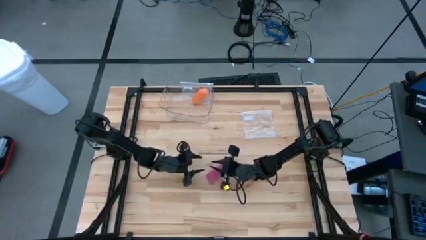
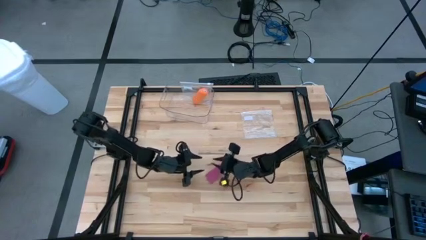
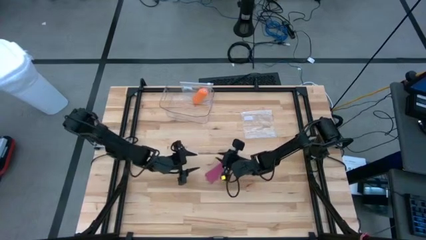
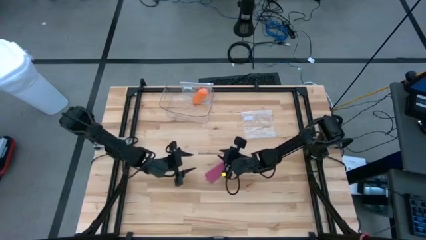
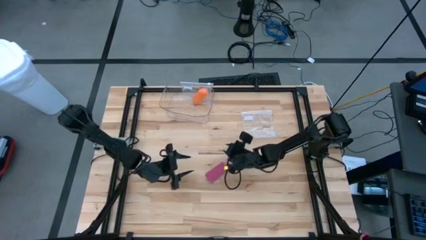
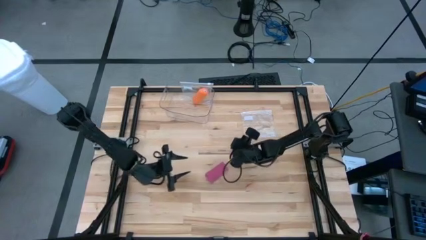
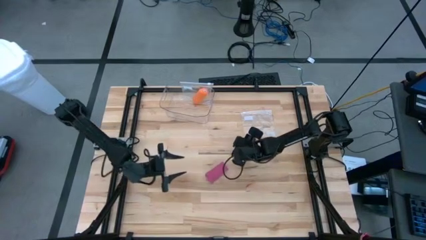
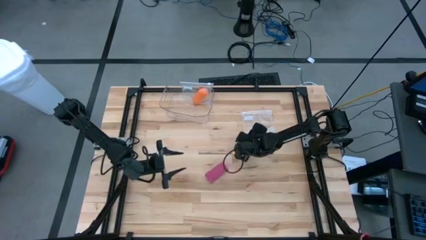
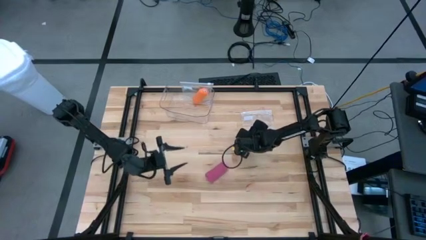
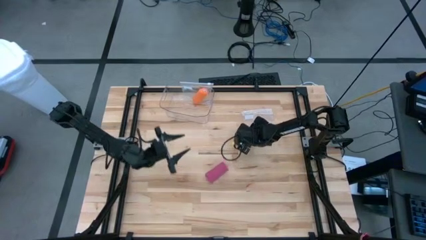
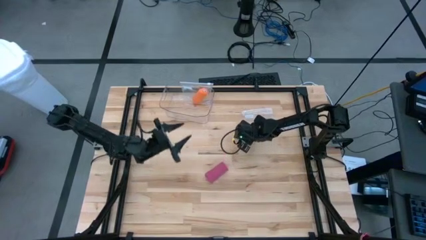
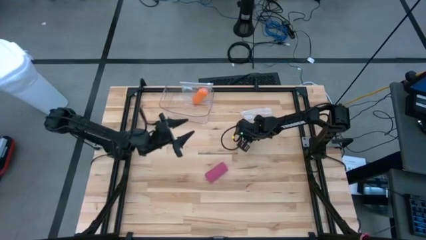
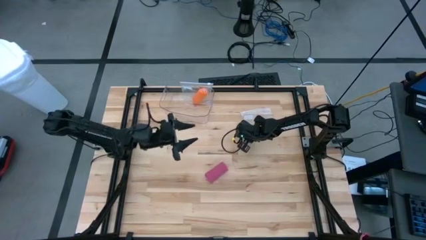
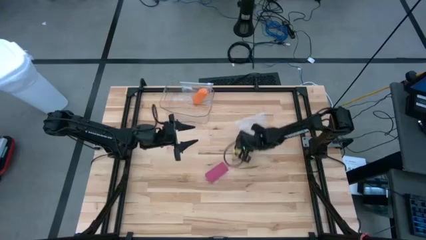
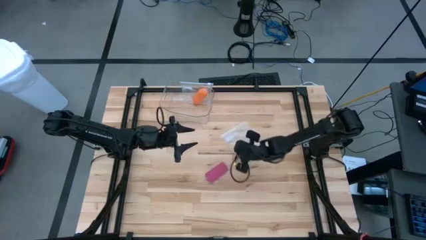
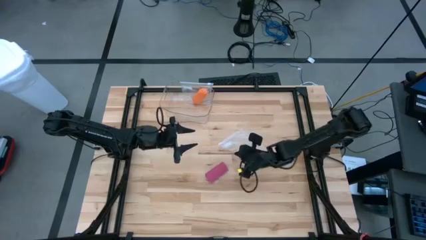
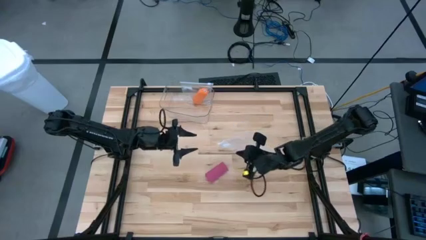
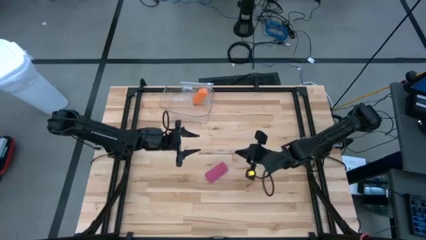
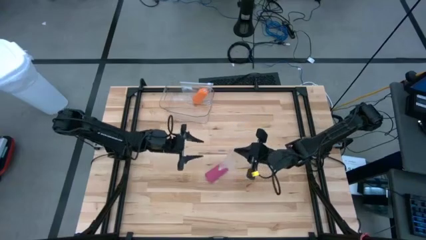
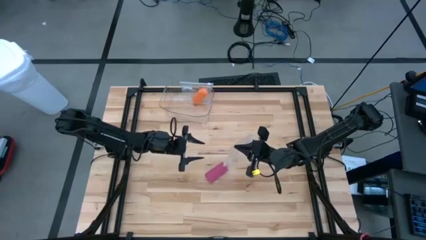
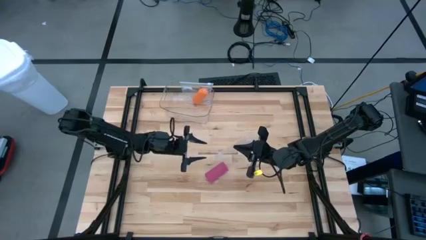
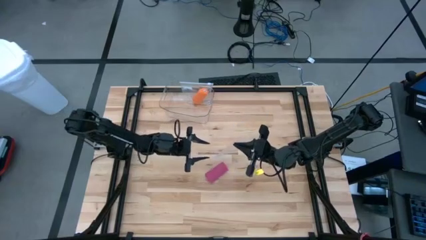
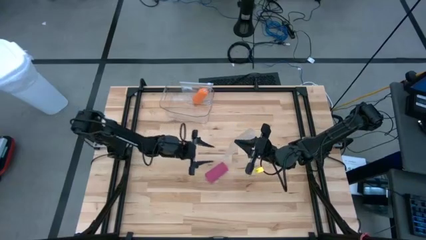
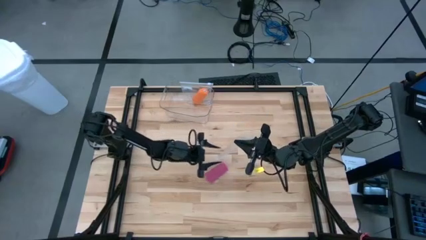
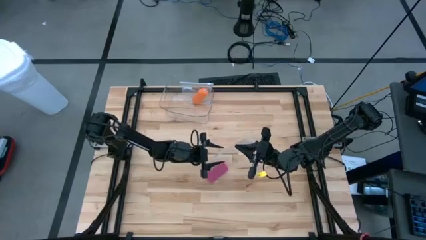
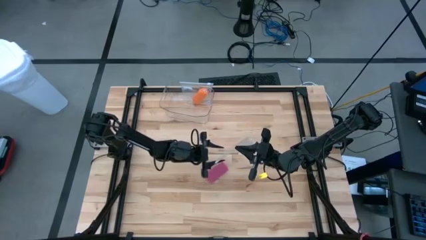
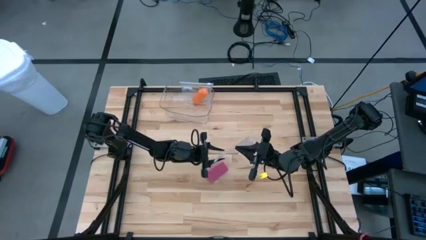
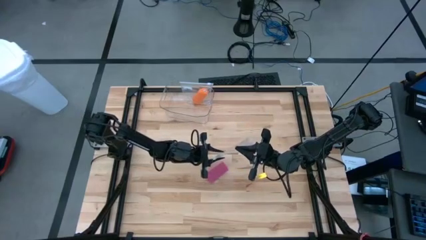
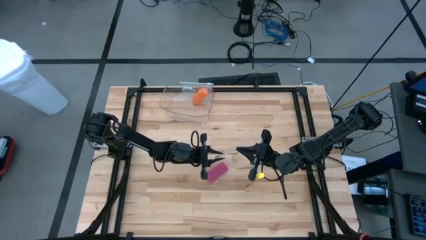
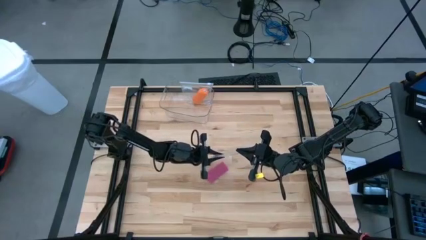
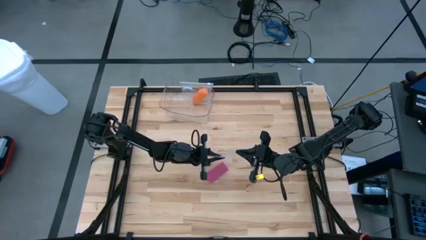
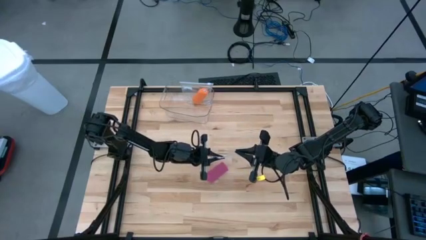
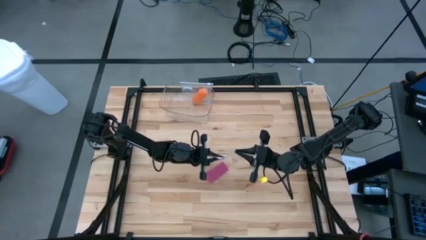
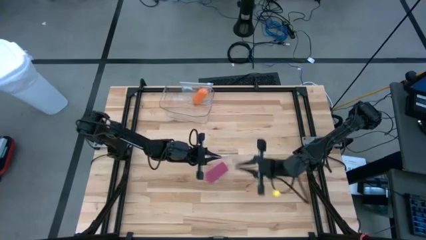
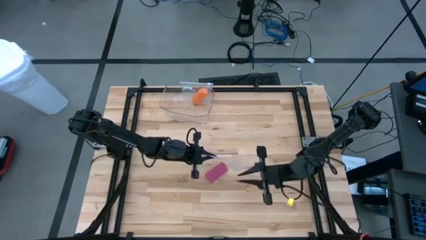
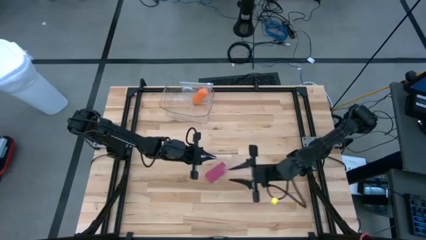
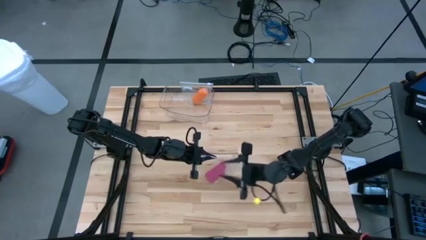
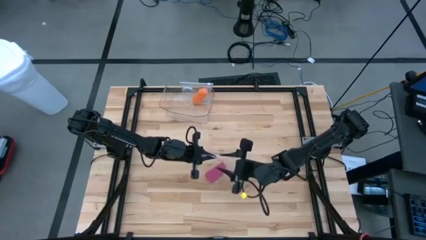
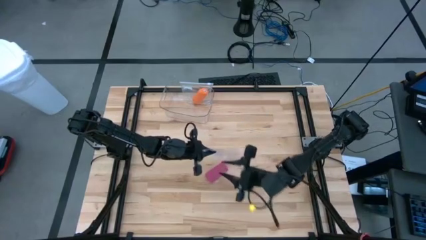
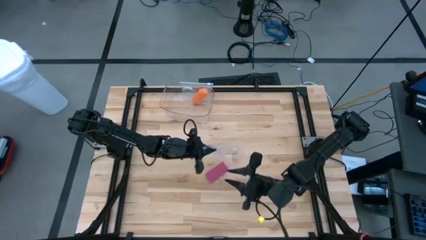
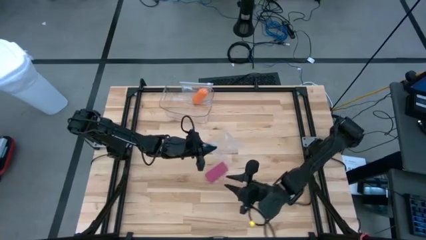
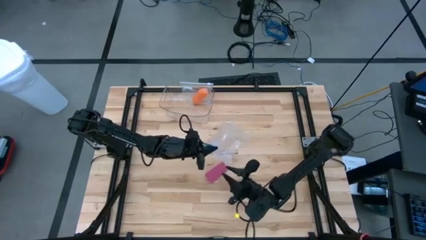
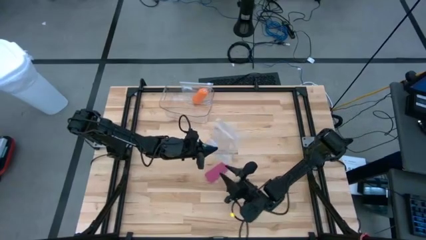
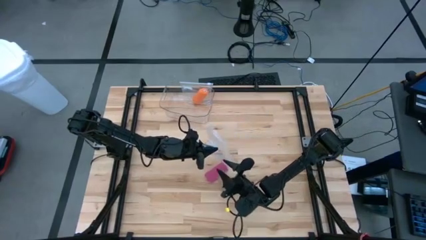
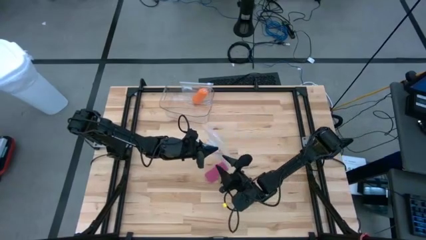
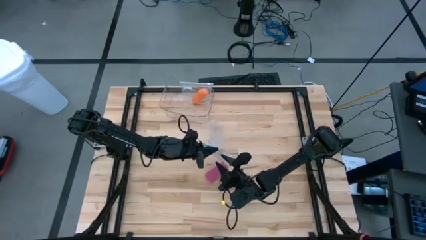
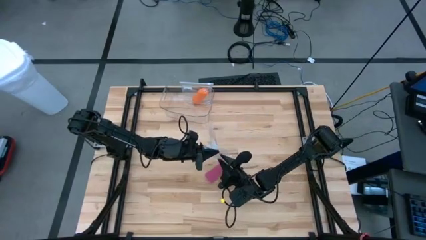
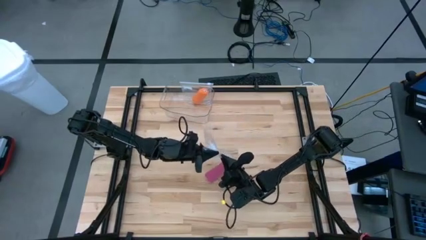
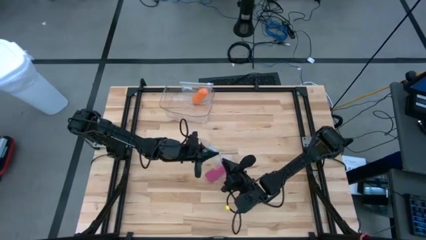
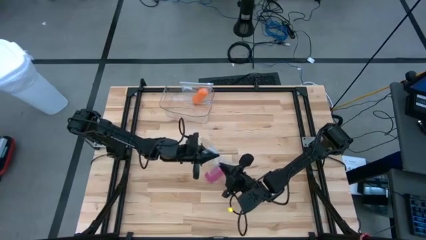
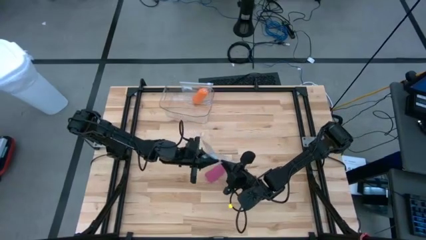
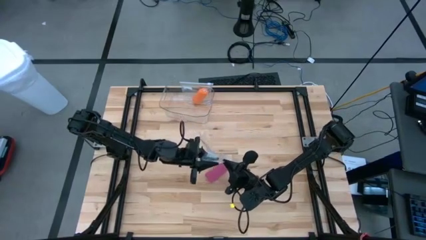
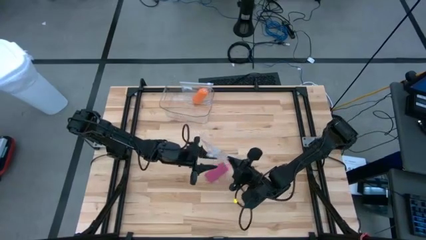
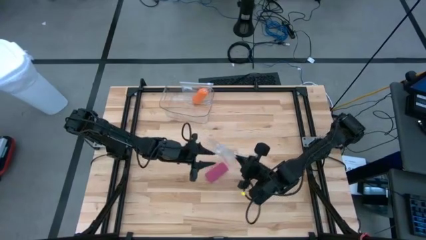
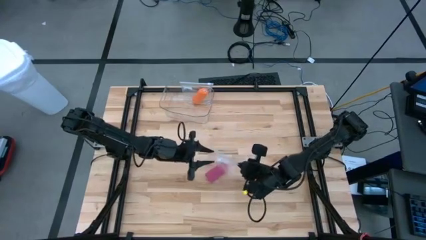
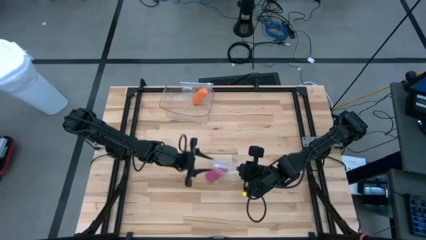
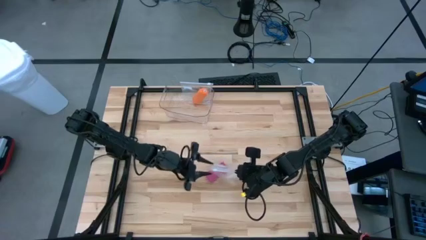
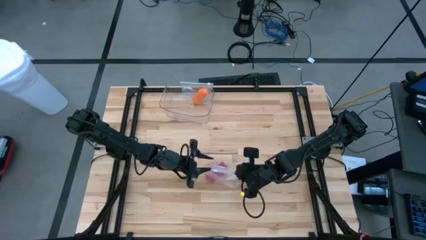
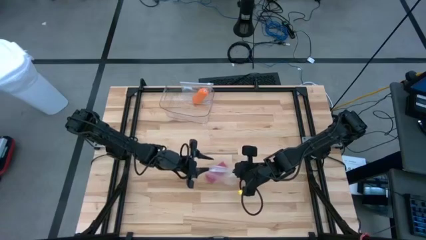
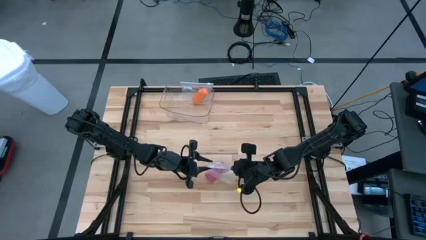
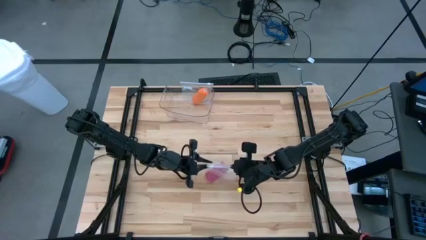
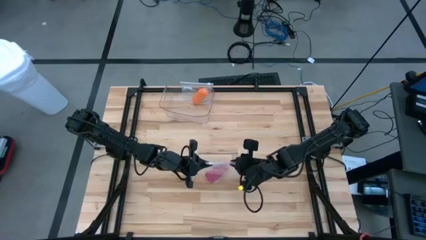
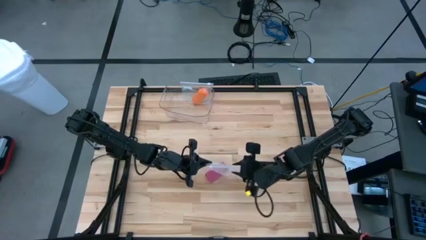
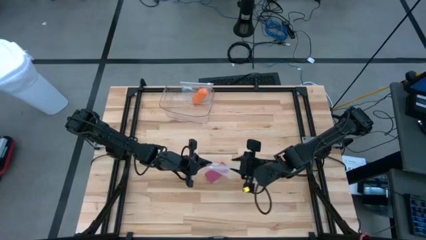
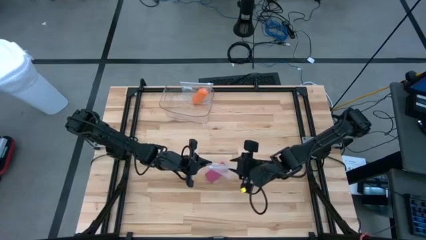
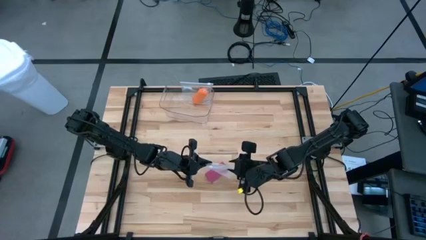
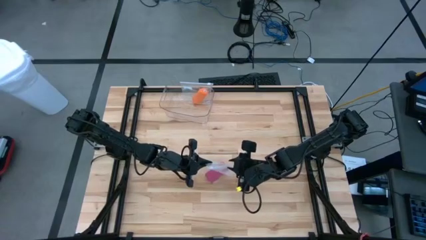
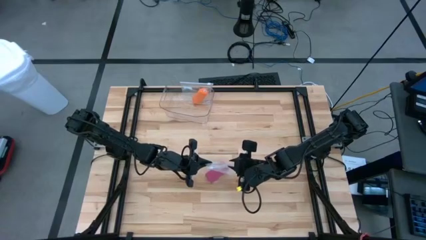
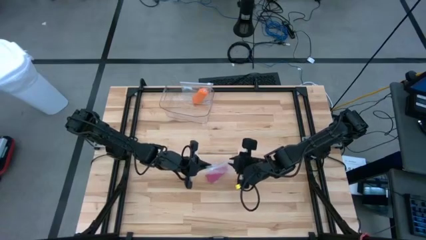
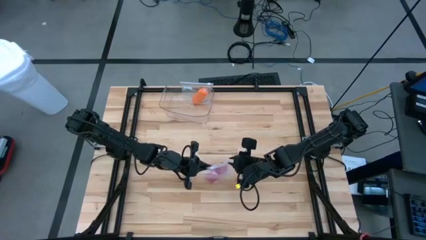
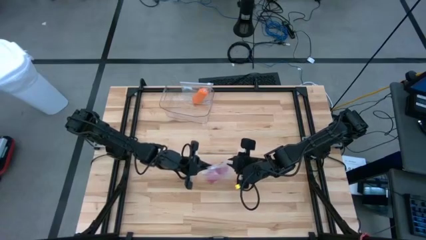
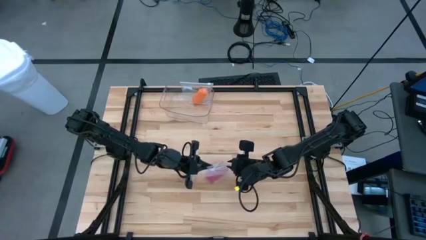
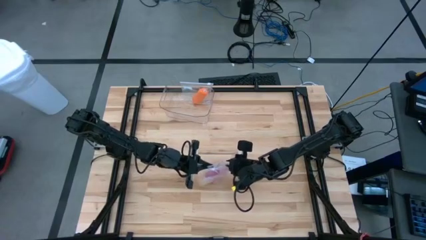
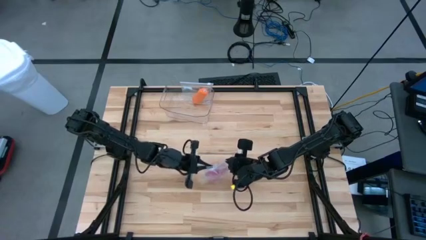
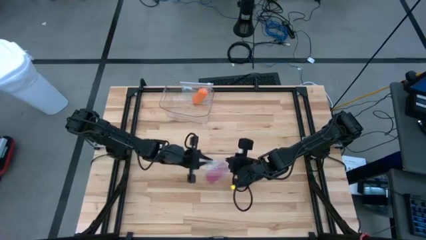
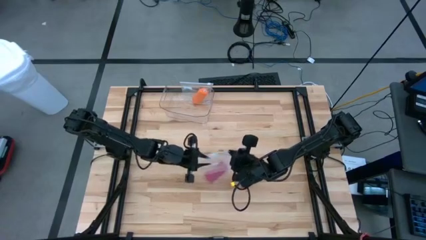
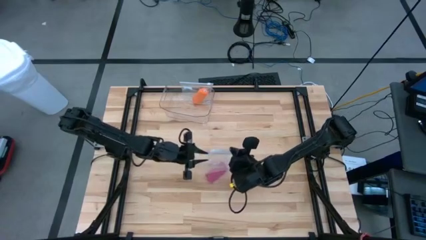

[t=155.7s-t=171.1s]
Task: Roll bandage
Put the rolled pink bandage into the transparent zip bag
